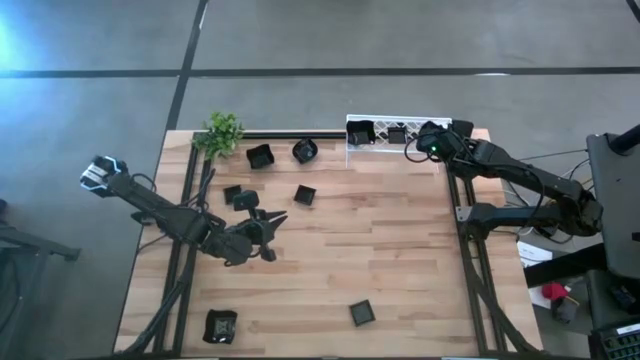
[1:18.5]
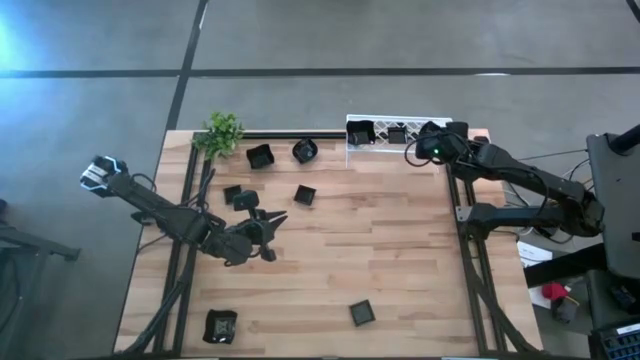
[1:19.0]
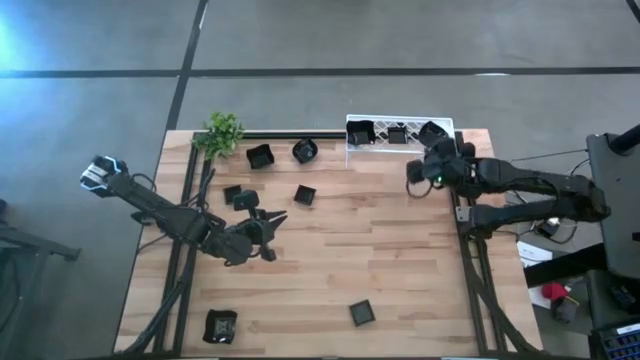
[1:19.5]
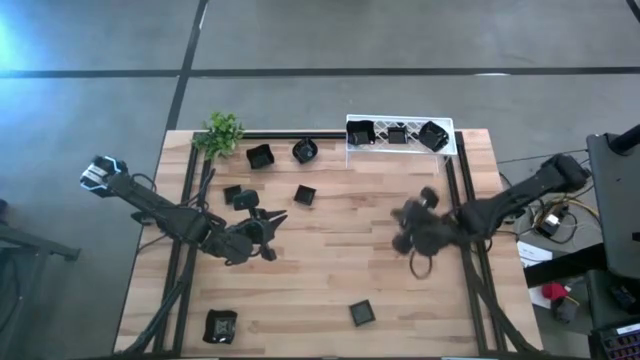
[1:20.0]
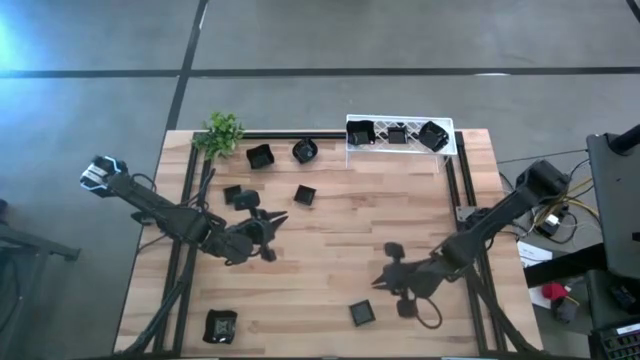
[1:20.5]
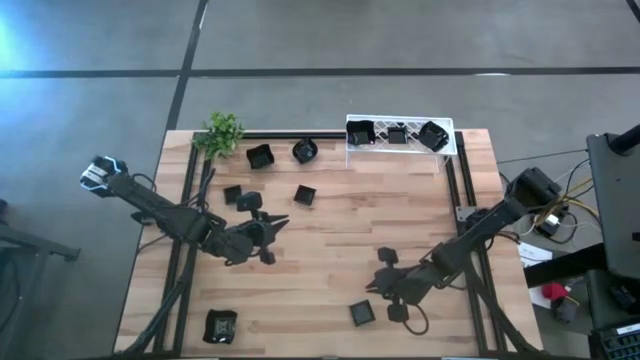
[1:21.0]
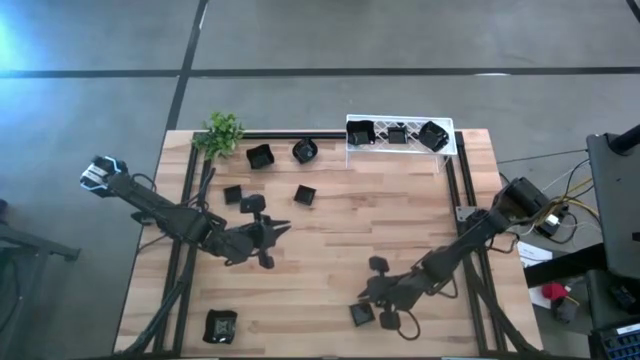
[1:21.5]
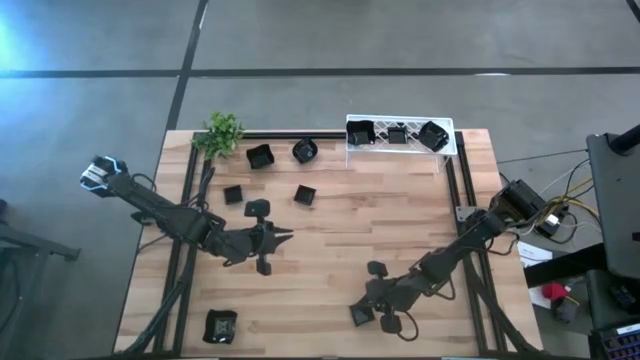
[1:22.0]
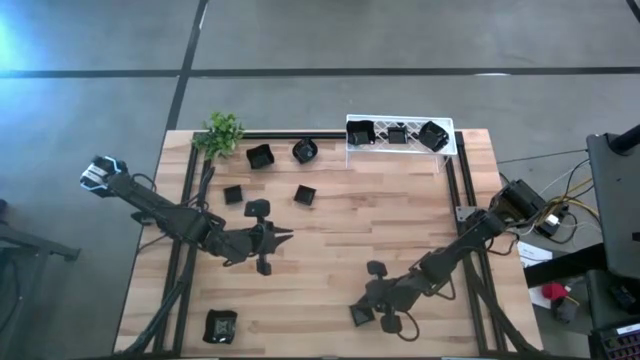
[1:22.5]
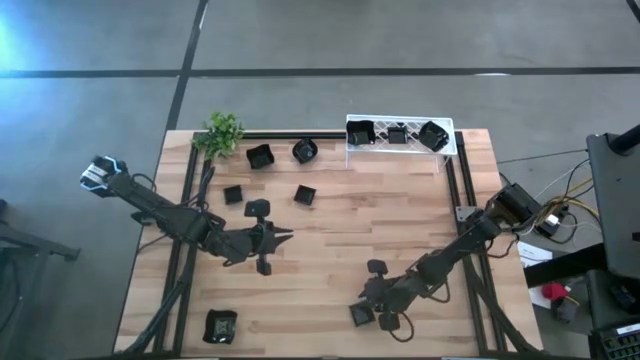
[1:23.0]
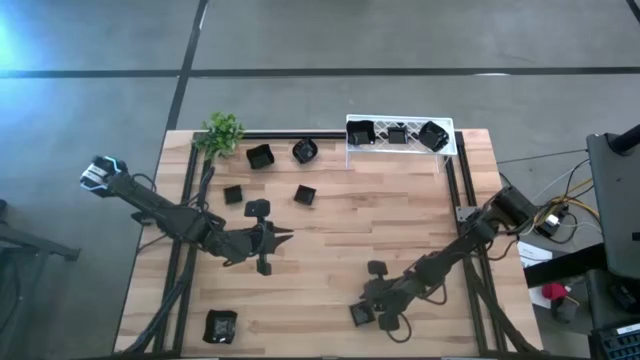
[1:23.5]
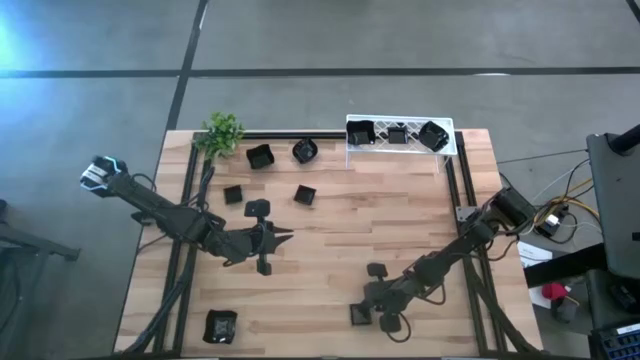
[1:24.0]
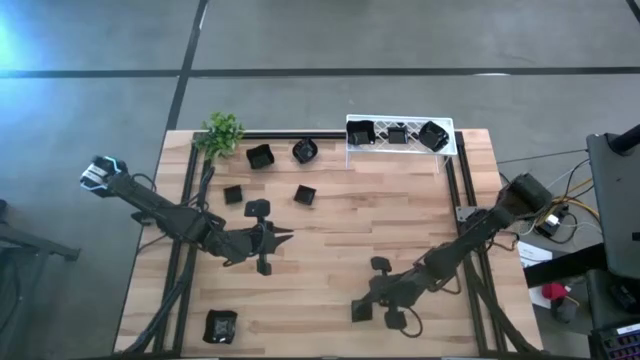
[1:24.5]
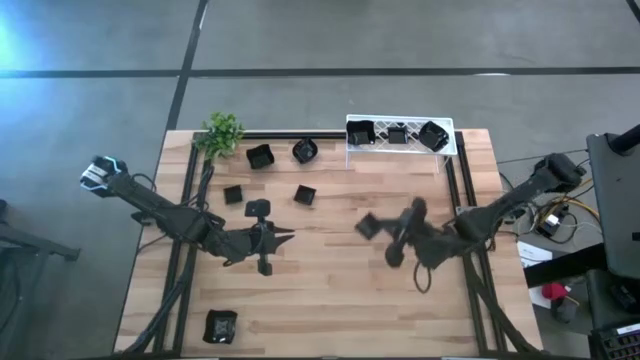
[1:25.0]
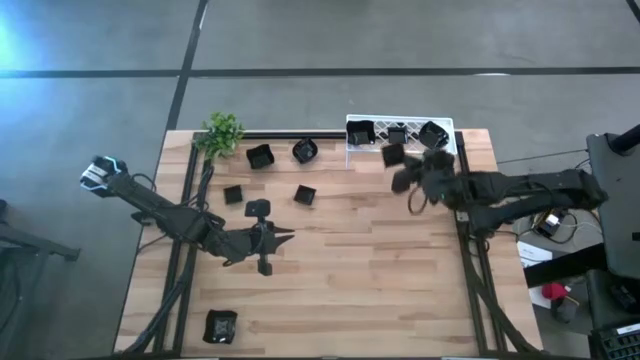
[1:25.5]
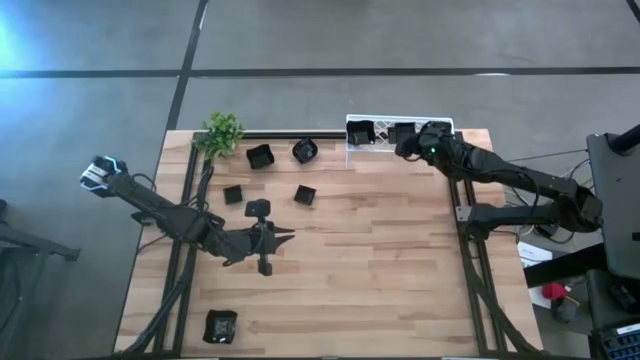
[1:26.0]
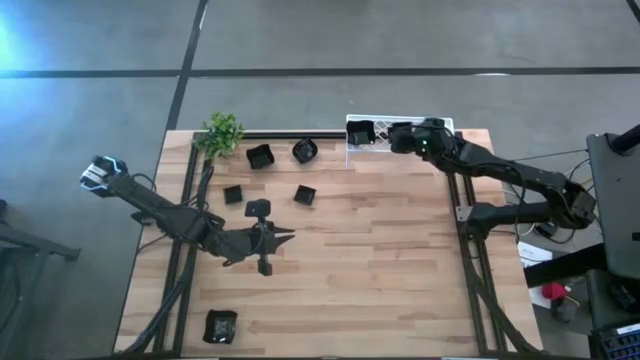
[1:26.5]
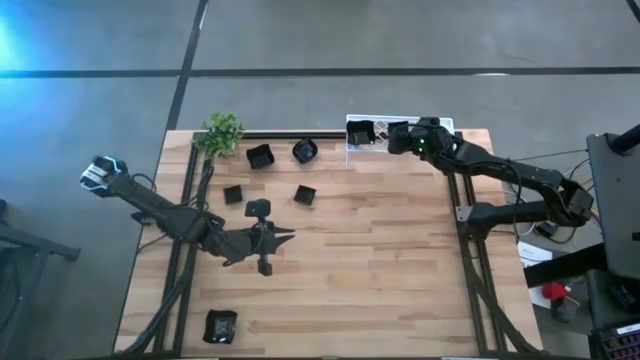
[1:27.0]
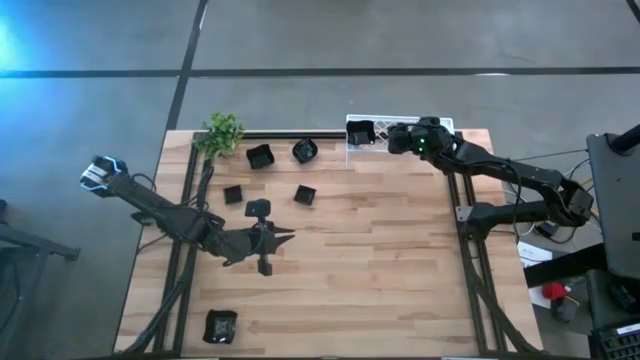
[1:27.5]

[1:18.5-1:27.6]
Task: Pick & Place Mini shaped plates
Stack the black square plate on top of the black square plate on the shelf

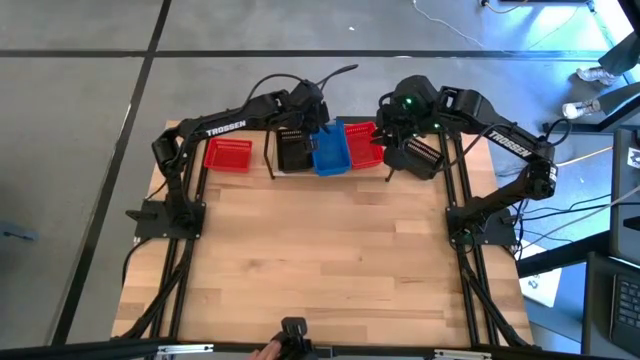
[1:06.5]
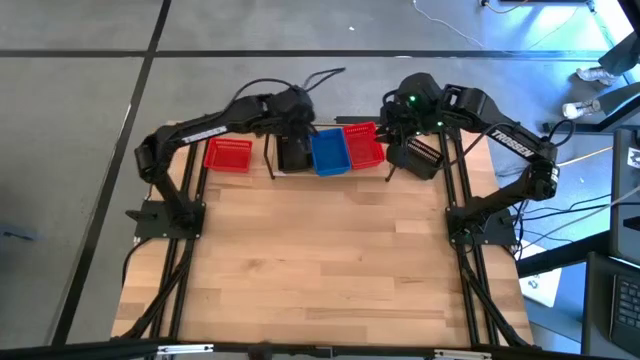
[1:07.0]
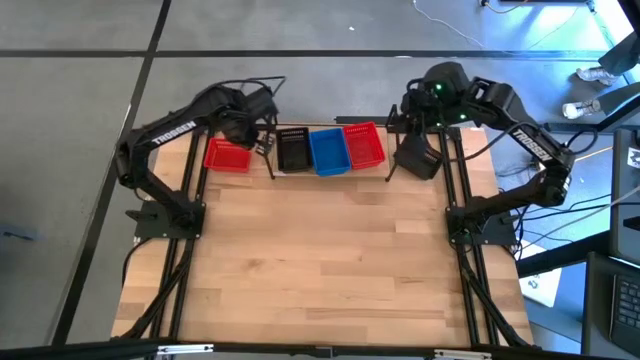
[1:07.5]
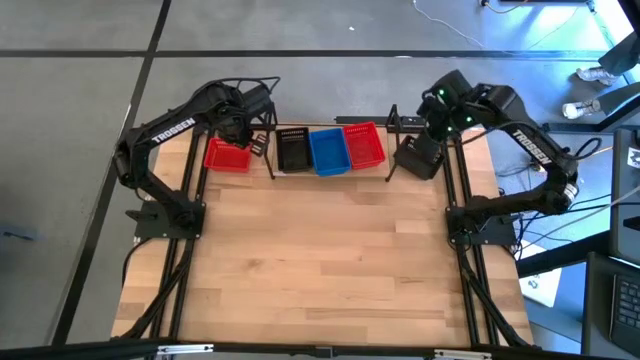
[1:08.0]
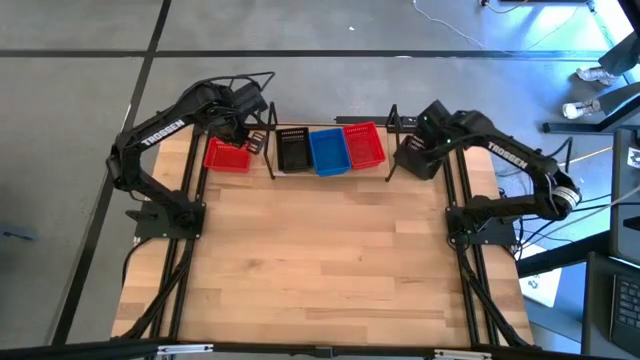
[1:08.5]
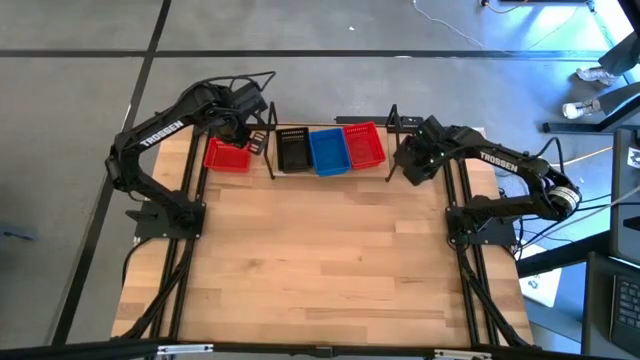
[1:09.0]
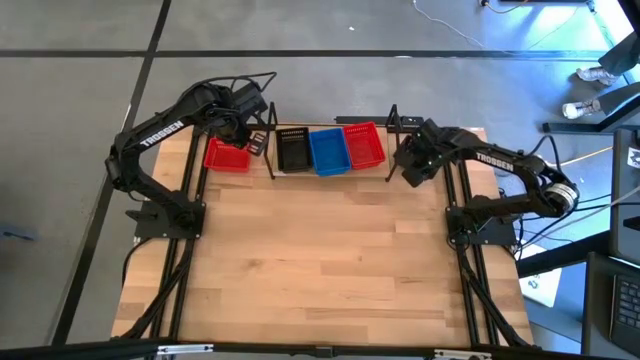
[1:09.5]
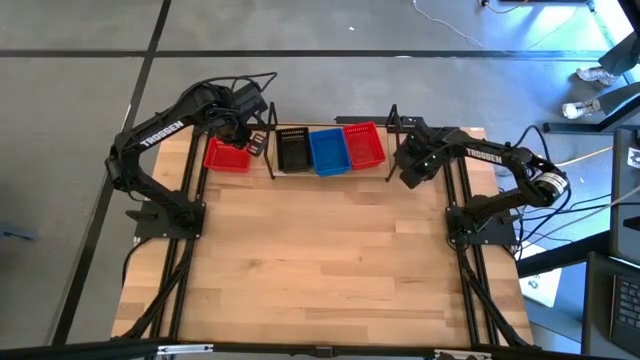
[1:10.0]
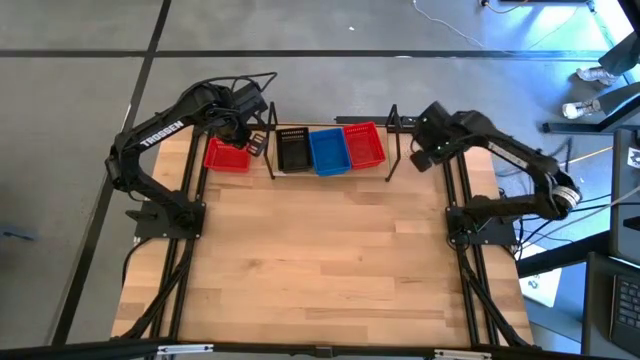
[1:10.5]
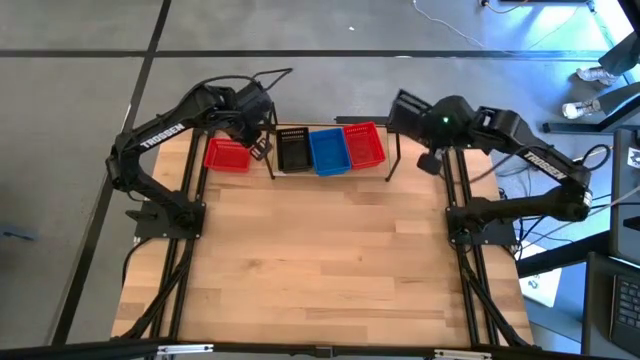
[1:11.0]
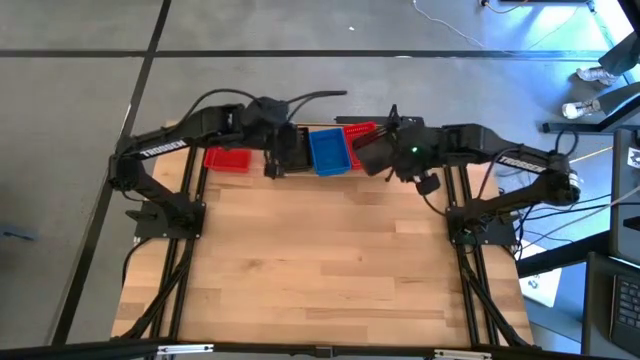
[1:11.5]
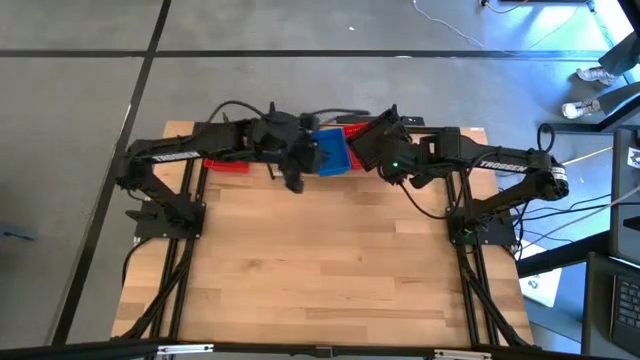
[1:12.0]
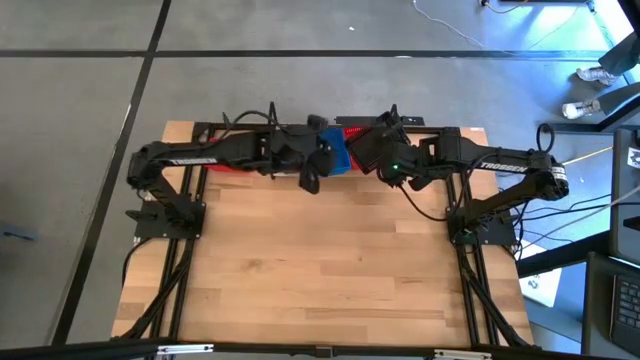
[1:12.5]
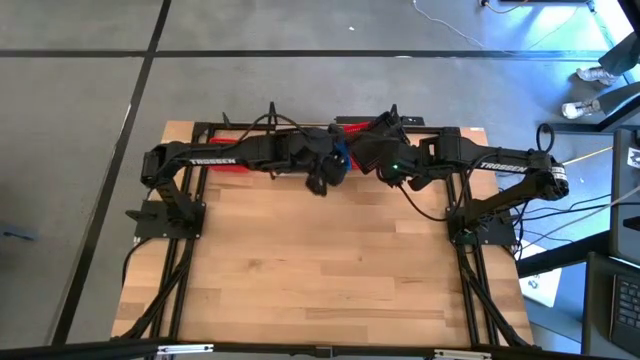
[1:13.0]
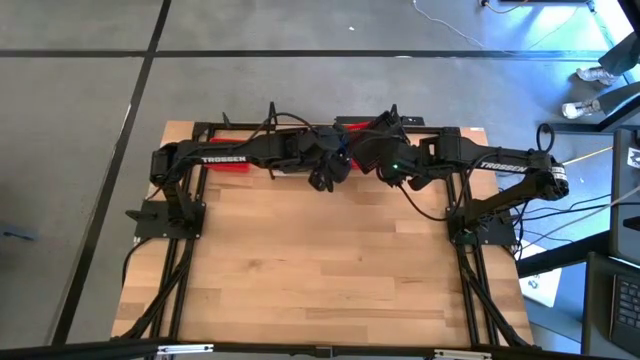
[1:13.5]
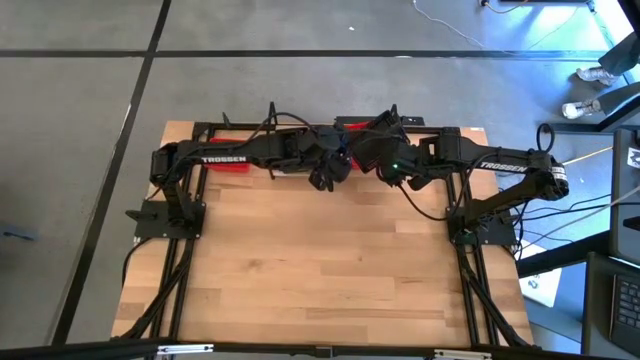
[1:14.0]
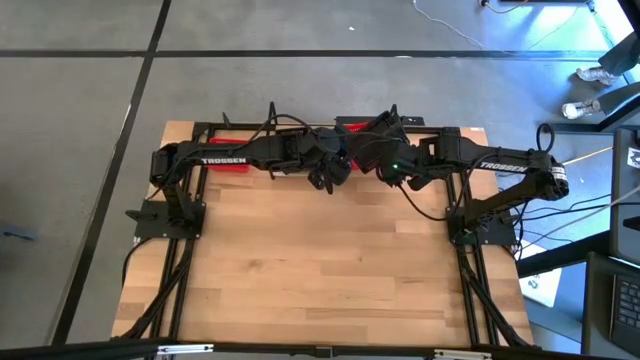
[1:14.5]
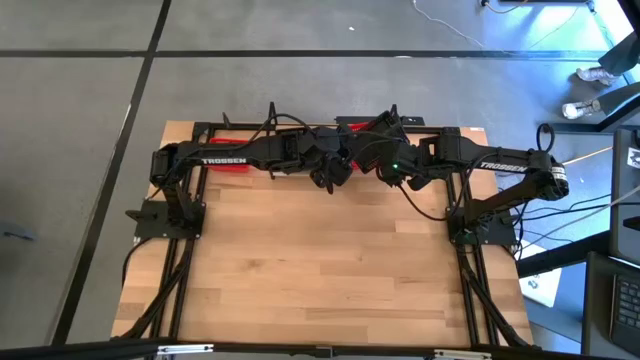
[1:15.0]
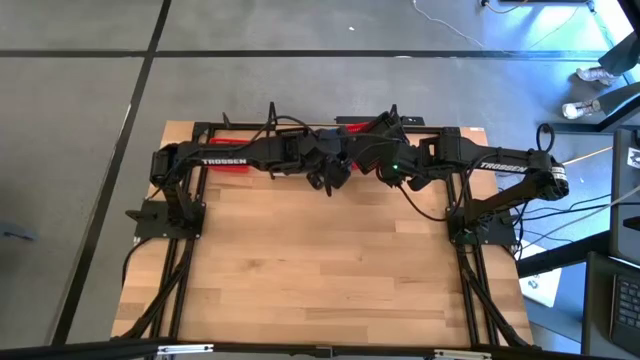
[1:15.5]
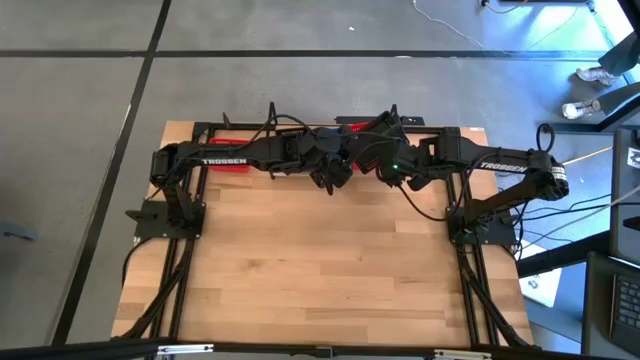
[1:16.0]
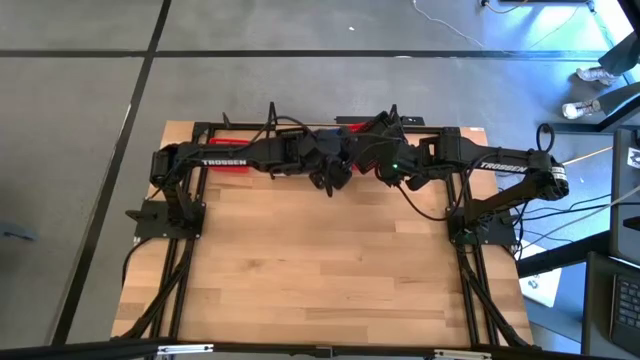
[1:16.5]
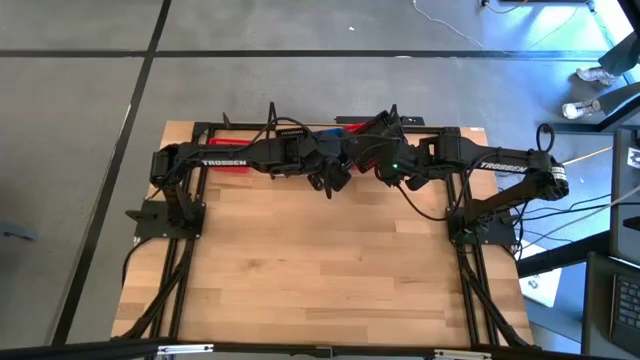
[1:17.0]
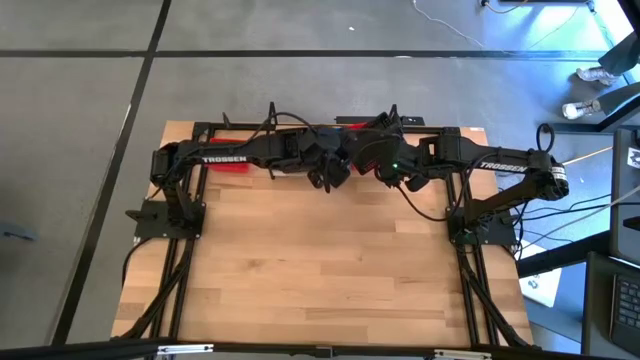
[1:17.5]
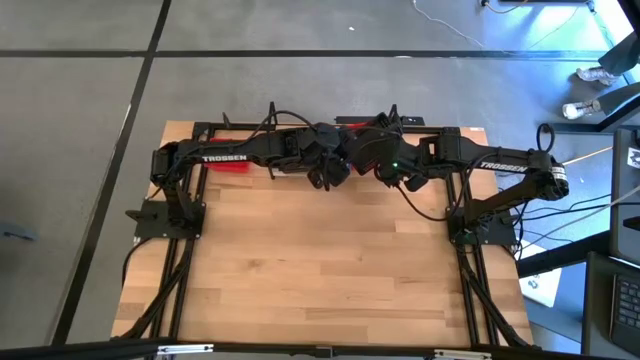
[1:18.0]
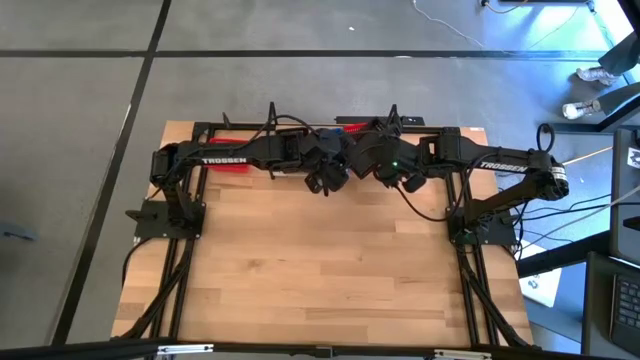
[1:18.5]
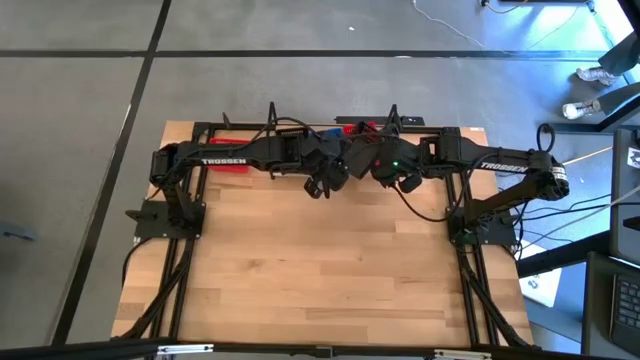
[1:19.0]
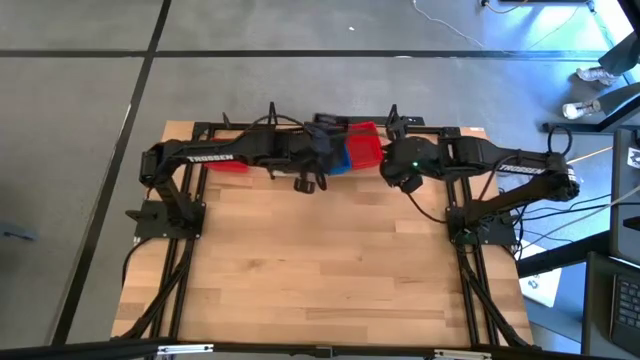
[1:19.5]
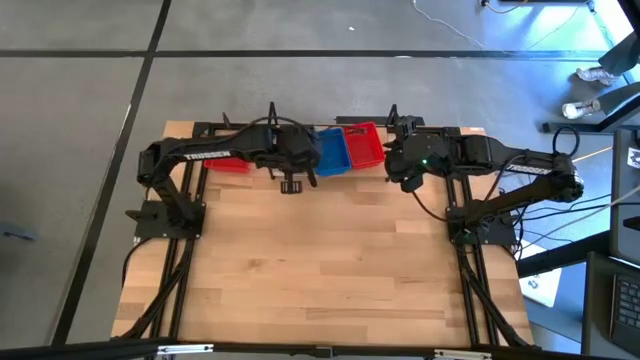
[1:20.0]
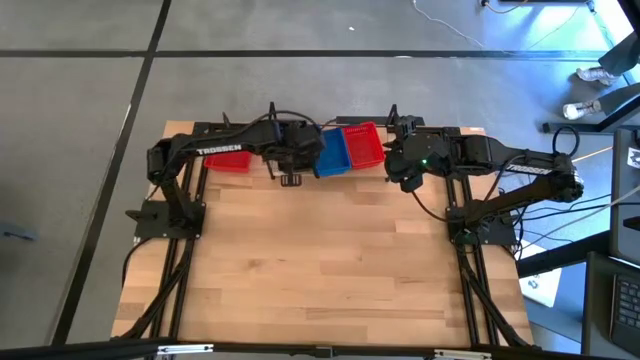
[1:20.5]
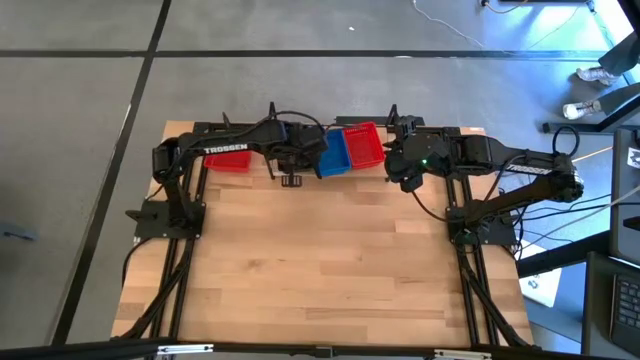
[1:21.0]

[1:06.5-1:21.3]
Task: Stack baskets on shelf by color
Stack the black bin on top of the black bin on the shelf
